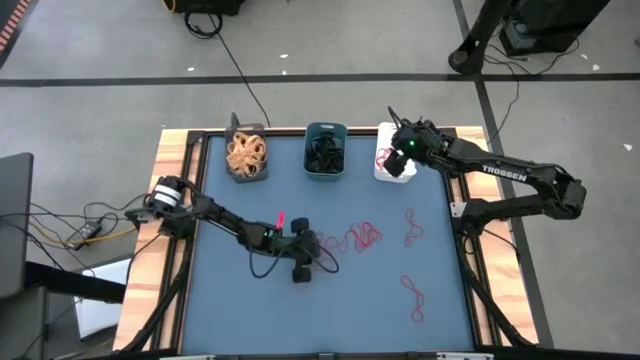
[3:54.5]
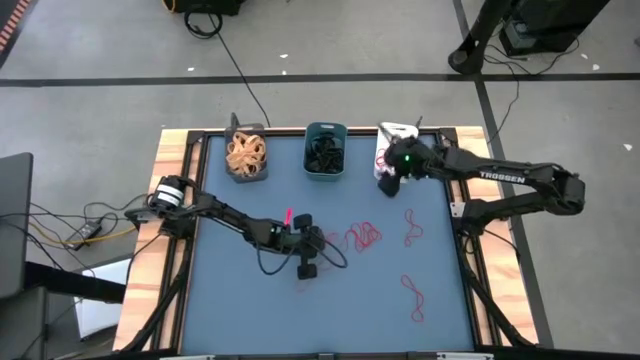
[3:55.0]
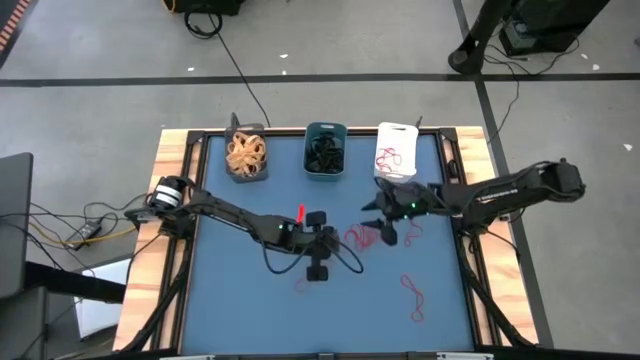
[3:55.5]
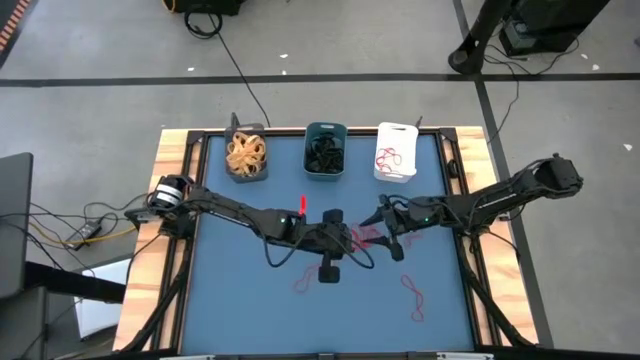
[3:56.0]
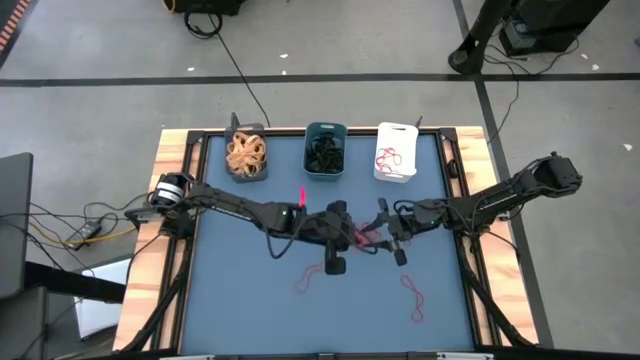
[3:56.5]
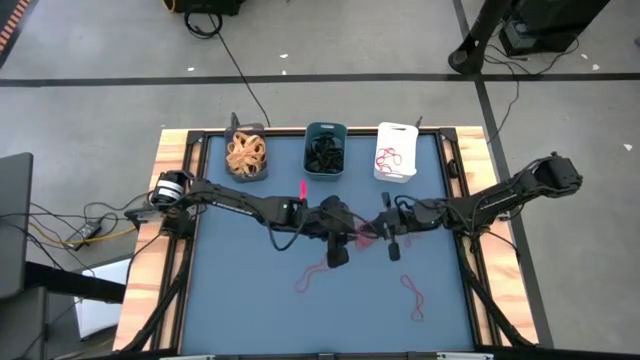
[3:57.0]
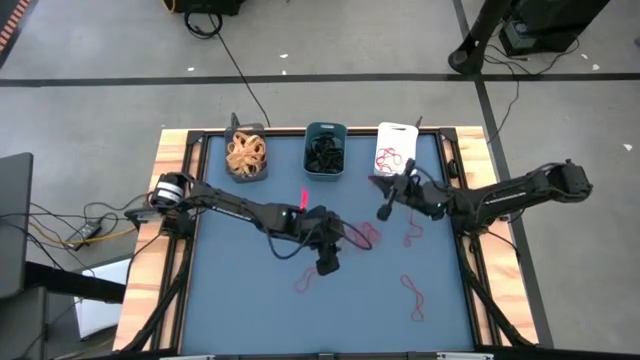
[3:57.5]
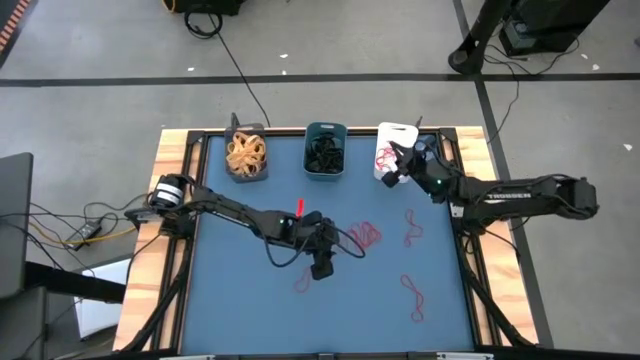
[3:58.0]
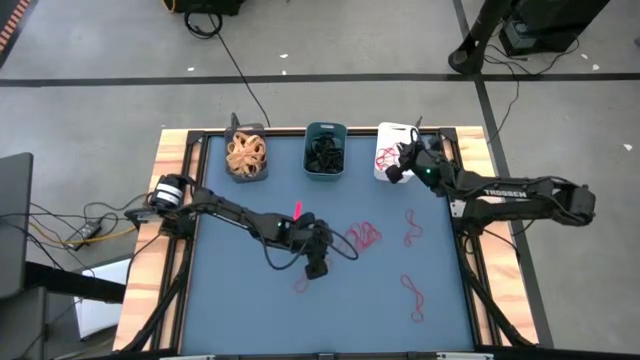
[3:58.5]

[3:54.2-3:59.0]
Task: Sort rubber bands into baskets
Put the red rubber band into the white bin

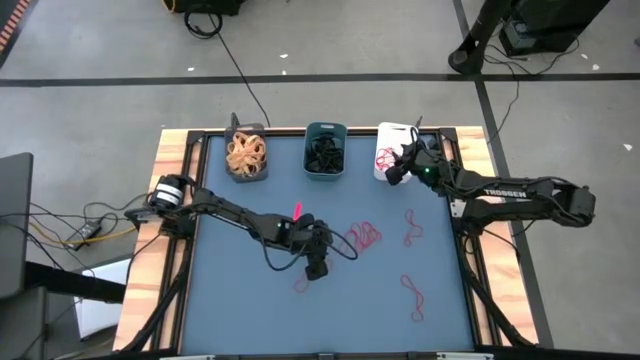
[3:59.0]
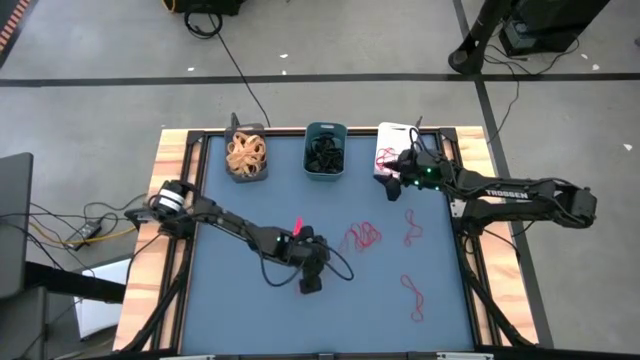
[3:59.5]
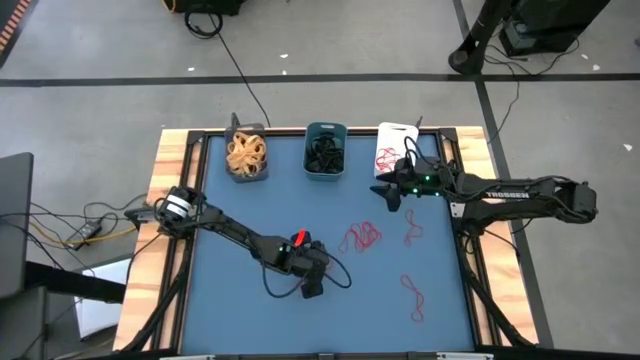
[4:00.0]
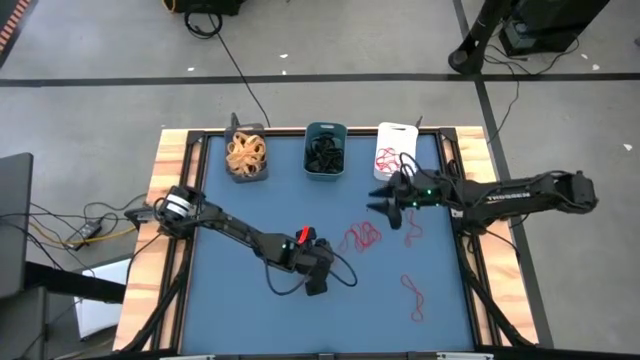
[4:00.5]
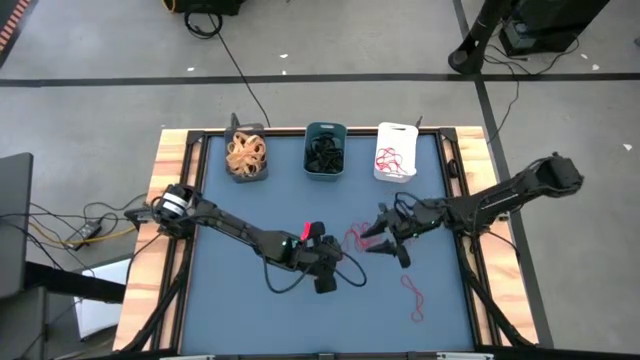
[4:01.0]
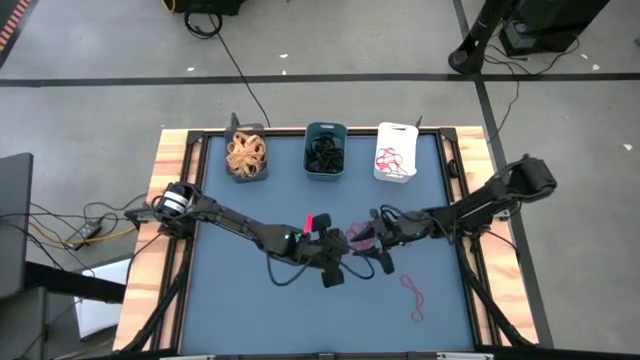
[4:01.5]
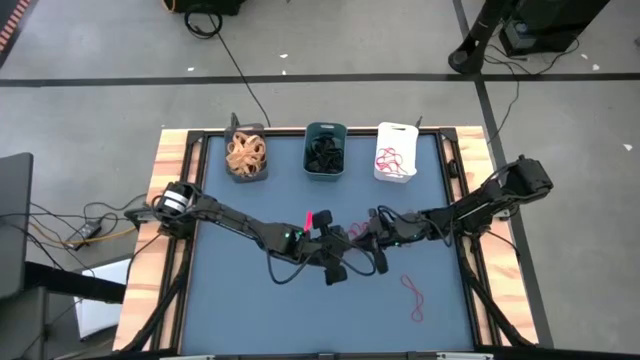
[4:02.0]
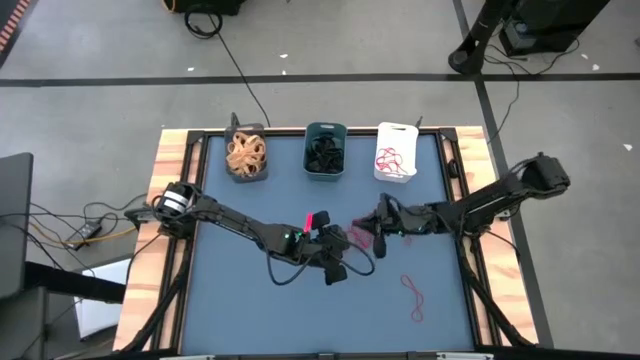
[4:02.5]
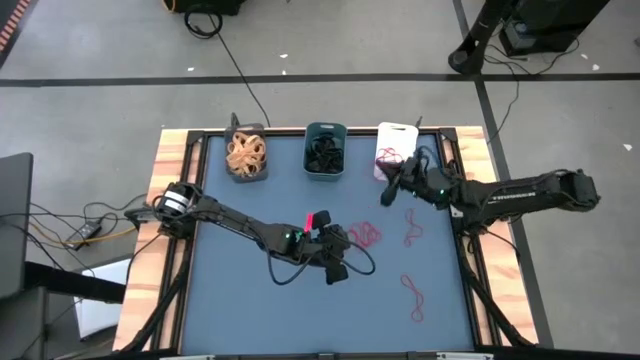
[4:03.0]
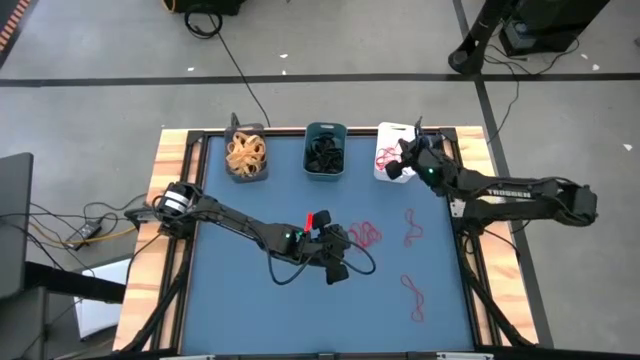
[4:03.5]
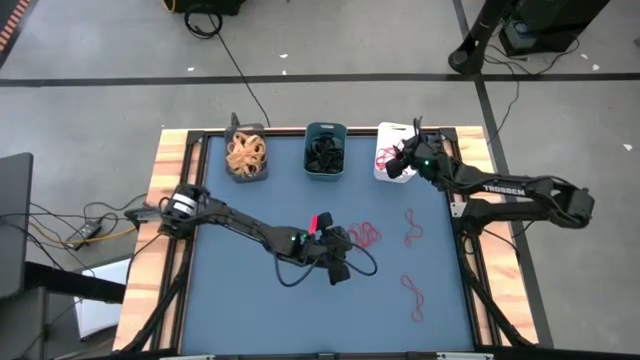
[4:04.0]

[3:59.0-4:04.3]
Put the red rubber band into the white bin

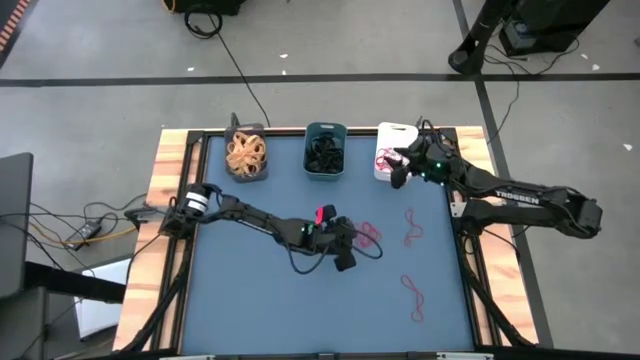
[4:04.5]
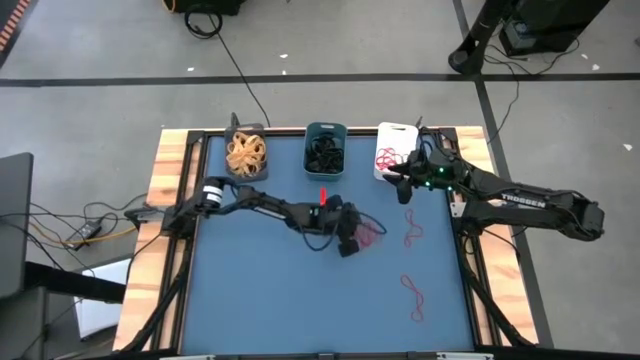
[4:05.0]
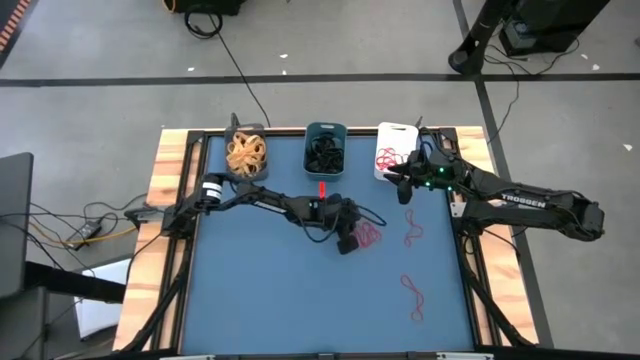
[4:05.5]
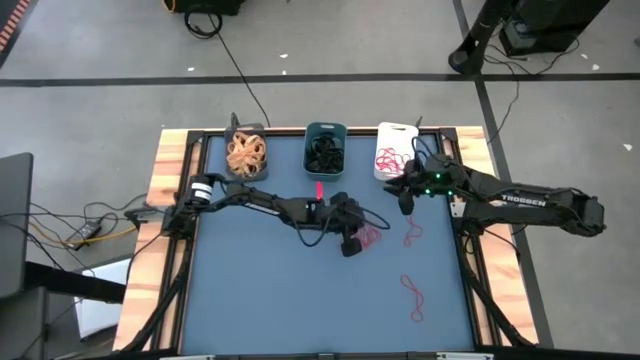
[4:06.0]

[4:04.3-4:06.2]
Put the red rubber band into the white bin

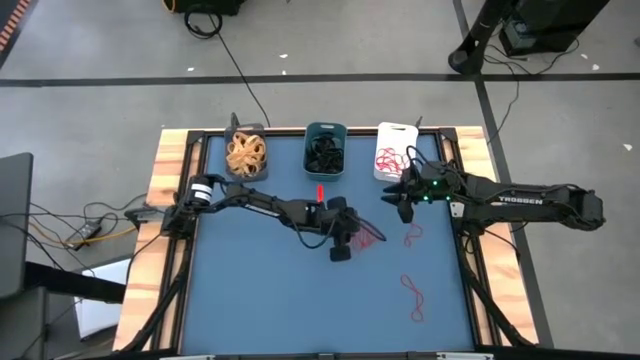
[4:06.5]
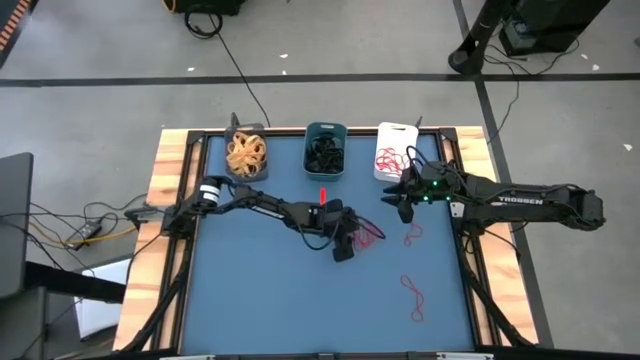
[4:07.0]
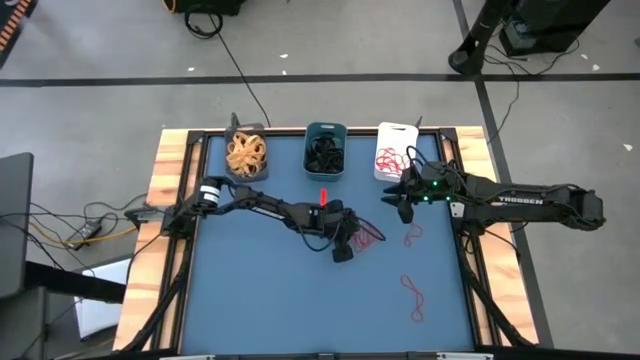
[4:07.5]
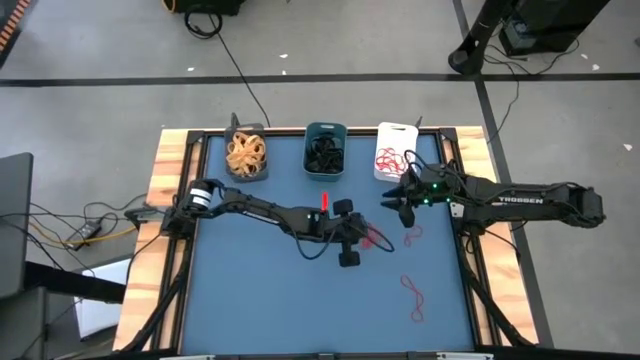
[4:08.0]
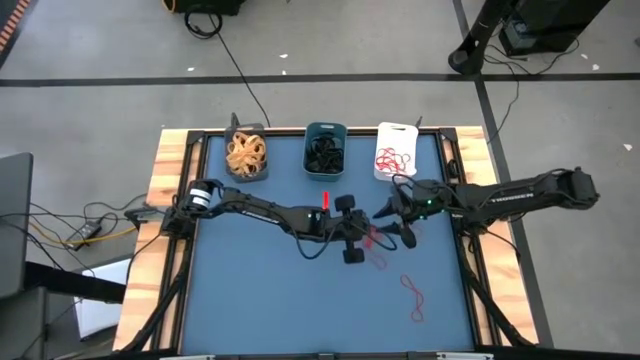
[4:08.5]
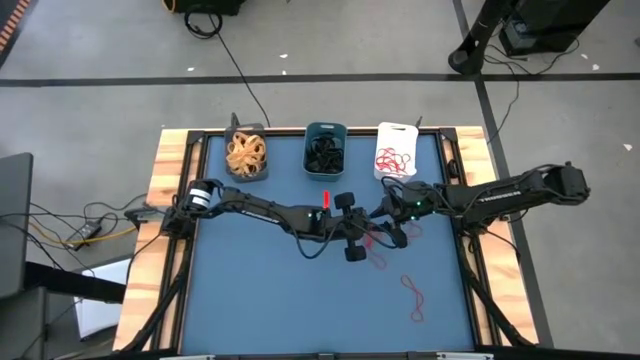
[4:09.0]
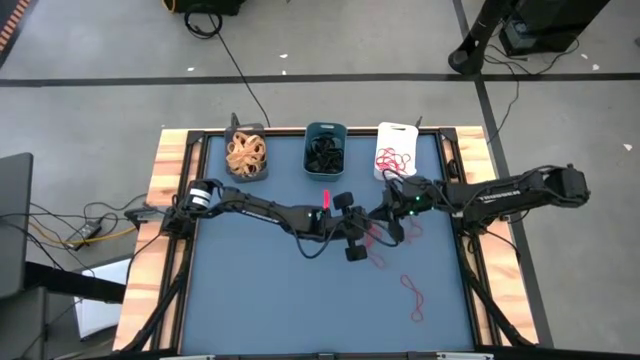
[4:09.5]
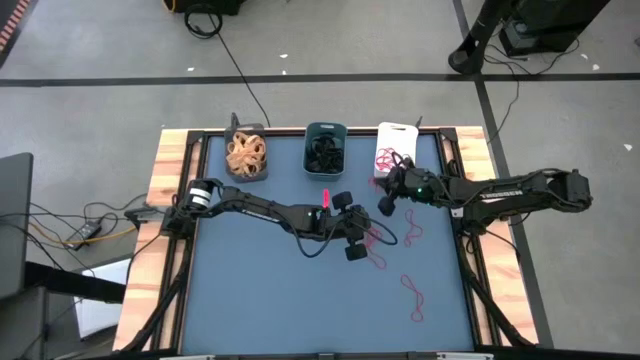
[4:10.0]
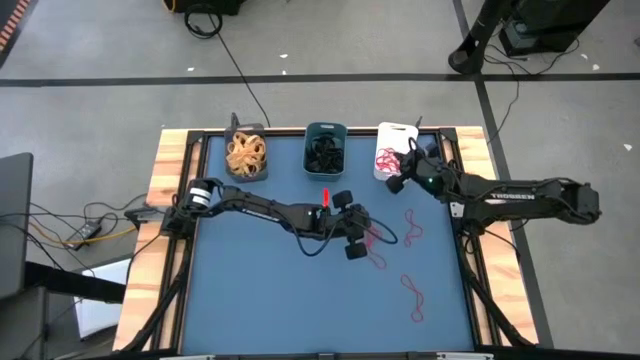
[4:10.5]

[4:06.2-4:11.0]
Put the red rubber band into the white bin

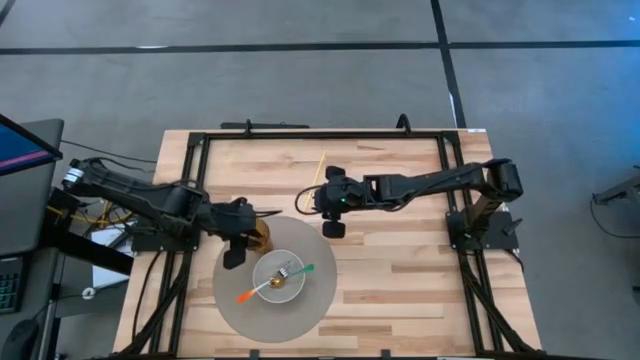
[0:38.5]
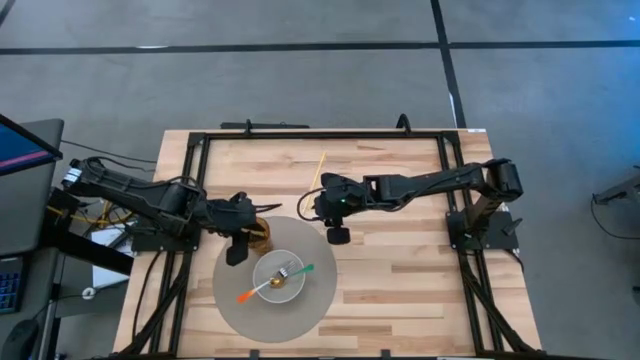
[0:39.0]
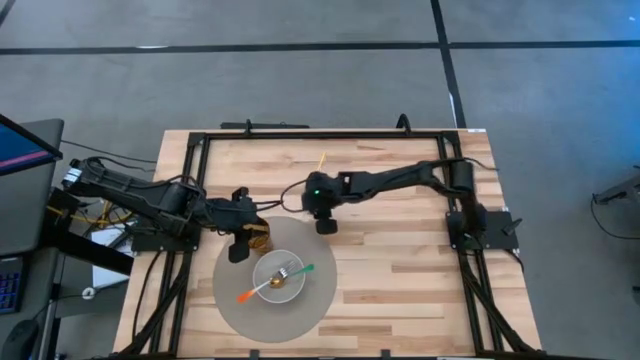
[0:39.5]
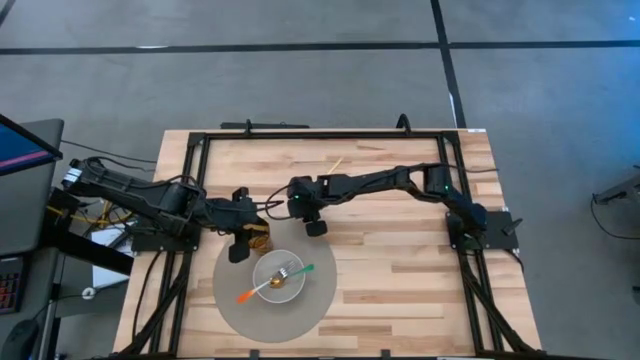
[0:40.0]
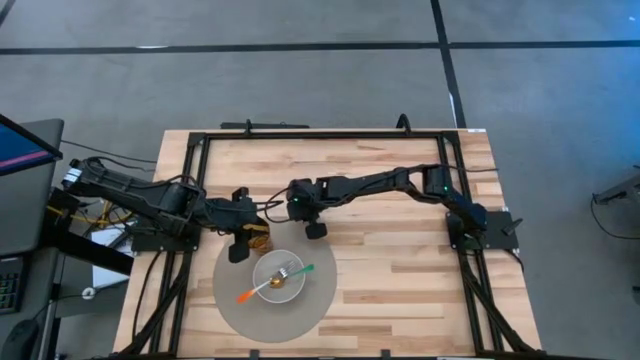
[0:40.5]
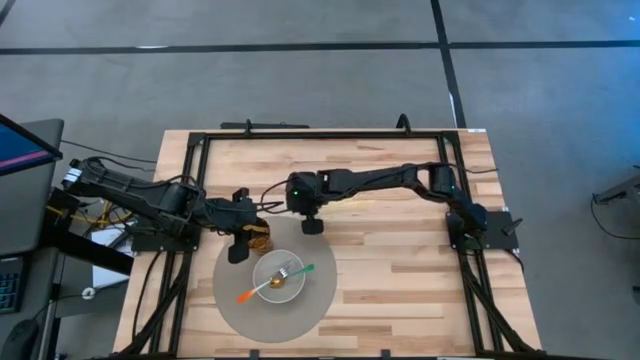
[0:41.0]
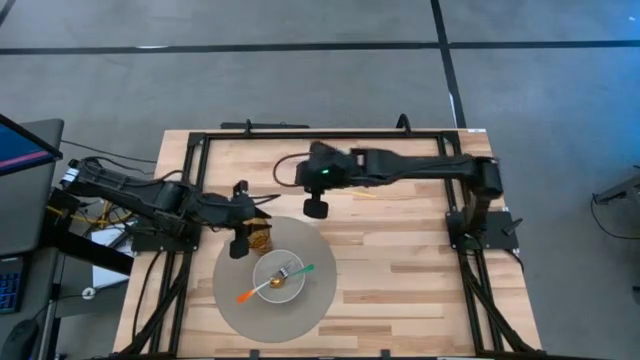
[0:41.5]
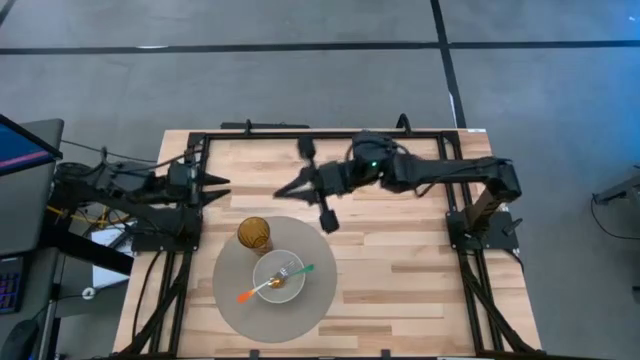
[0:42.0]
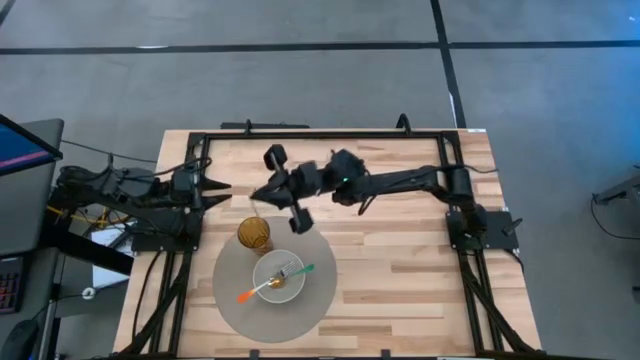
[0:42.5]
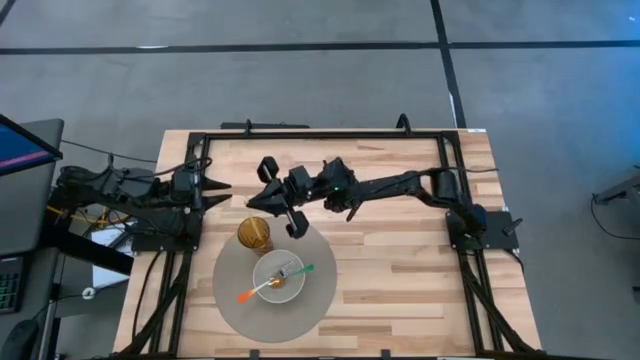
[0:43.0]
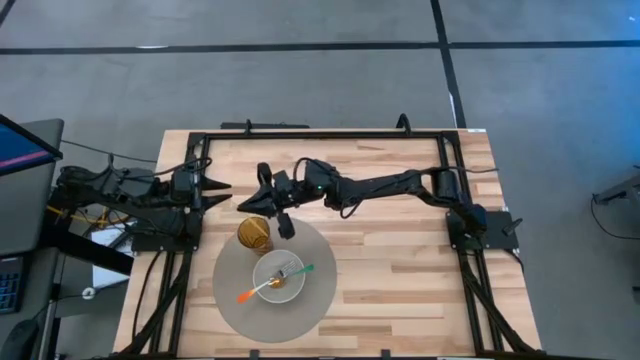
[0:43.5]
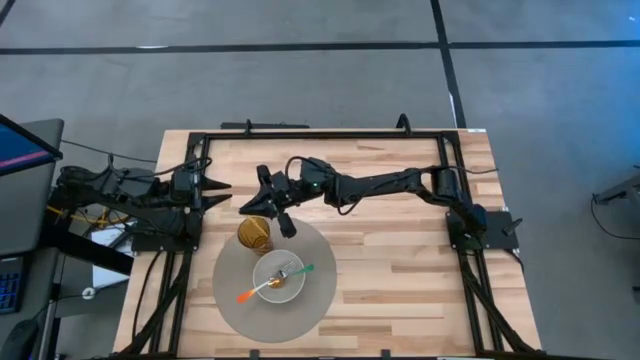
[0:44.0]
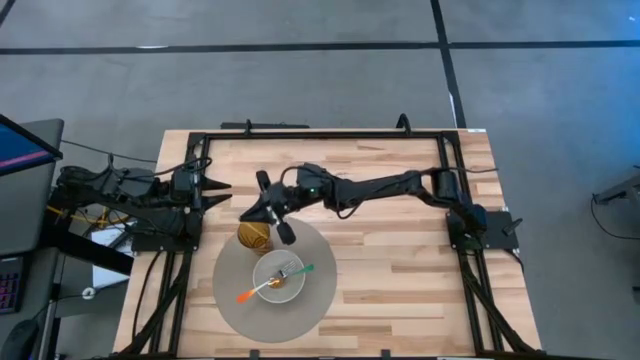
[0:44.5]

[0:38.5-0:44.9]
Task: Pick & Place Utensil
Put the yellow straw into the brown cup on the gray mat
